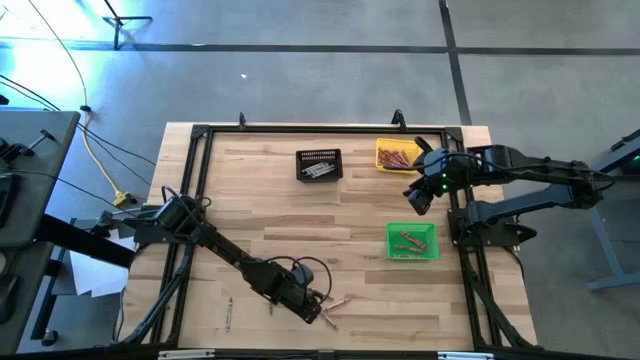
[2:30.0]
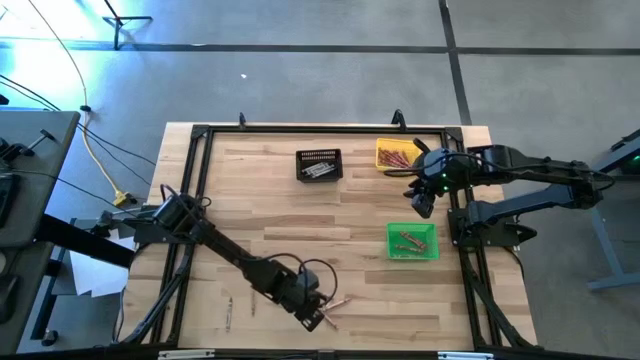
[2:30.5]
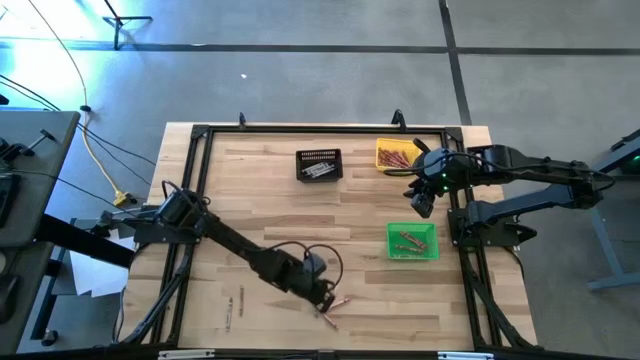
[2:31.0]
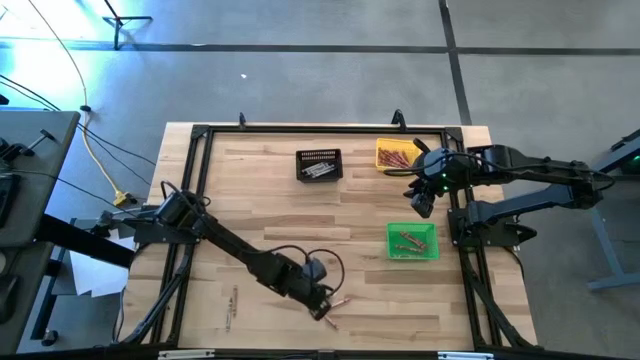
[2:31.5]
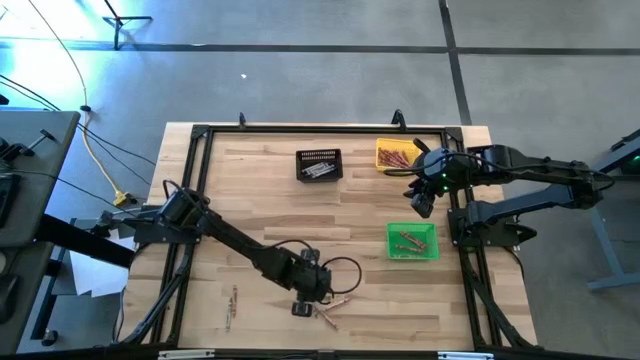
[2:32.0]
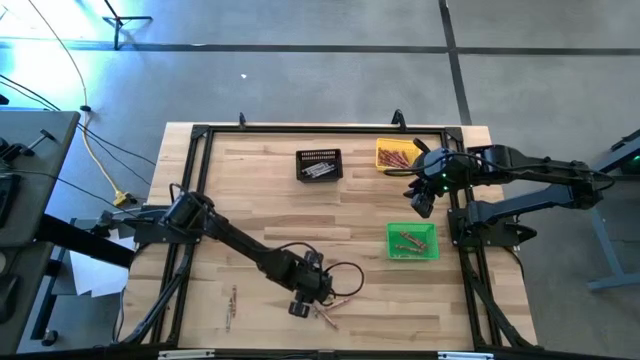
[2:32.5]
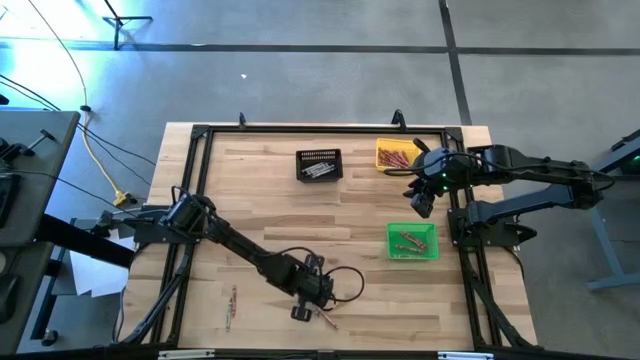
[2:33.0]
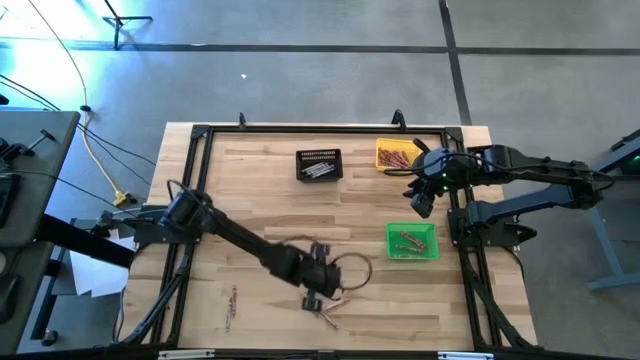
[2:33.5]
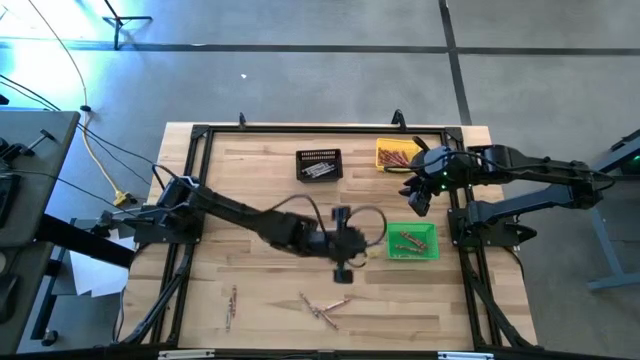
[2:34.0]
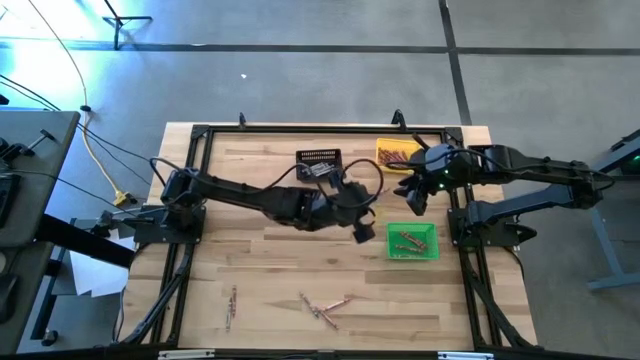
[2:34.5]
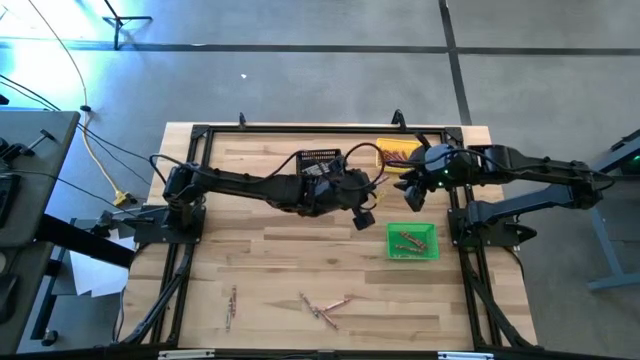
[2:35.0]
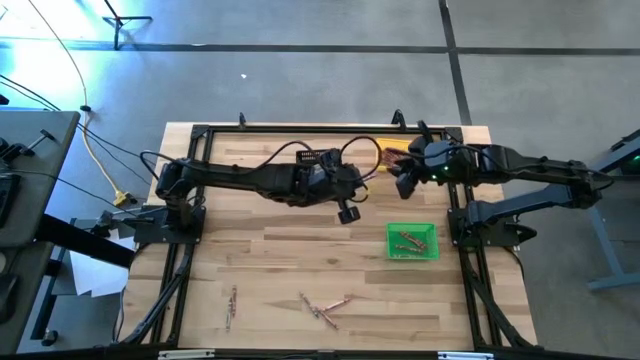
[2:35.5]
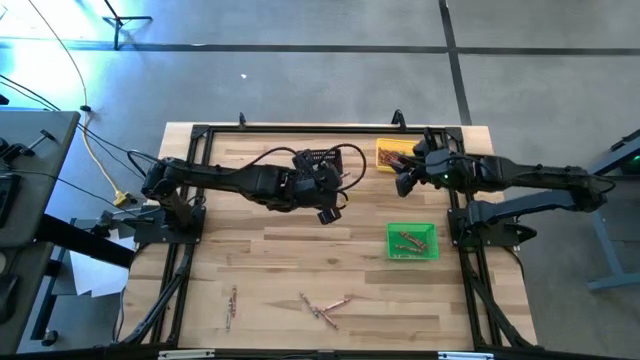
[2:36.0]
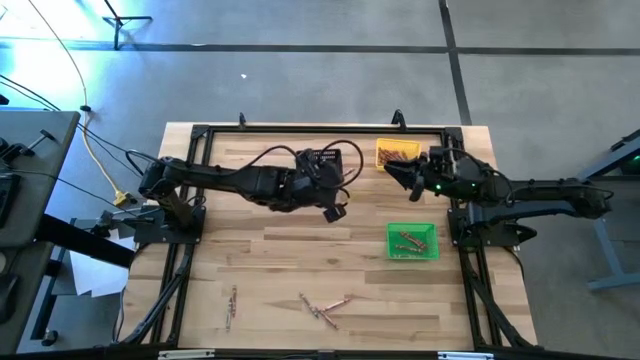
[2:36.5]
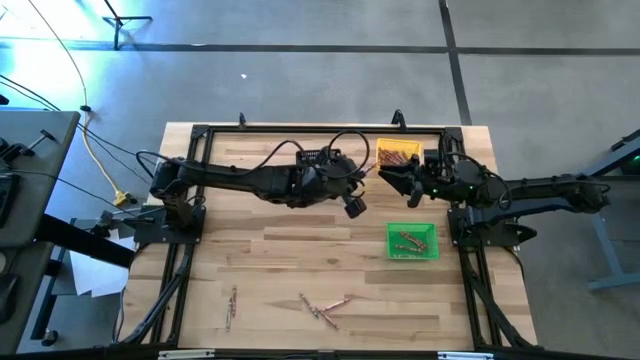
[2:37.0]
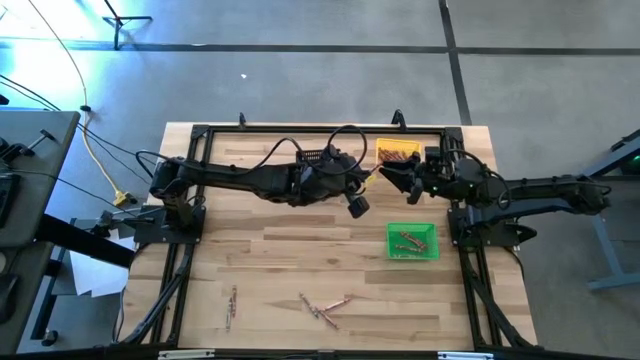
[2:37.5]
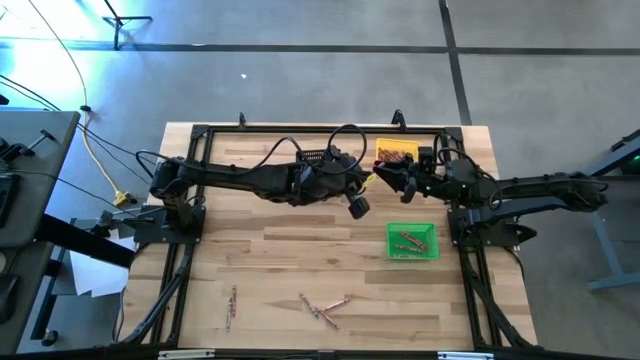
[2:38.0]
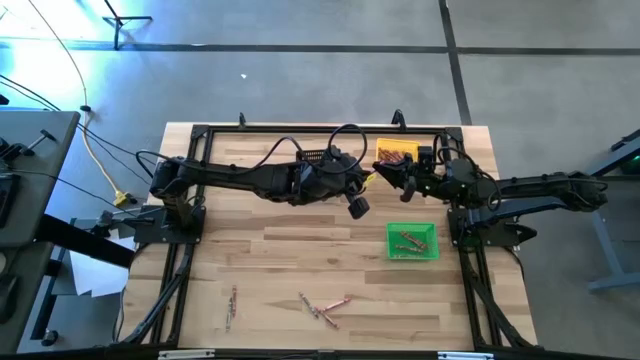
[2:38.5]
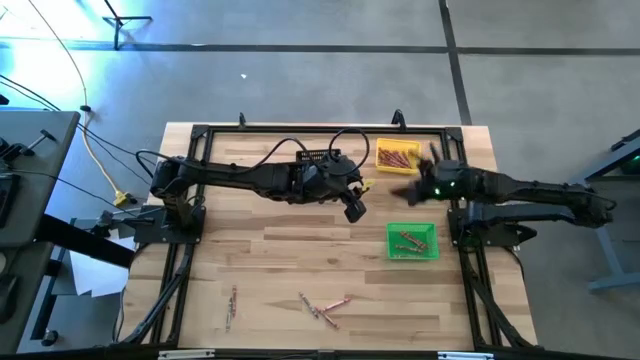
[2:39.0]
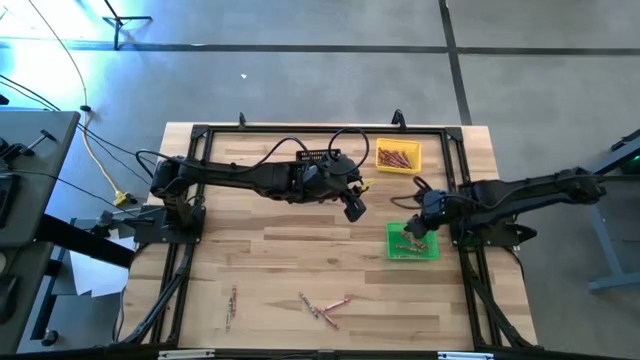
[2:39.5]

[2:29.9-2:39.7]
Task: Sort crayons
Put the pink crayon into the green basket

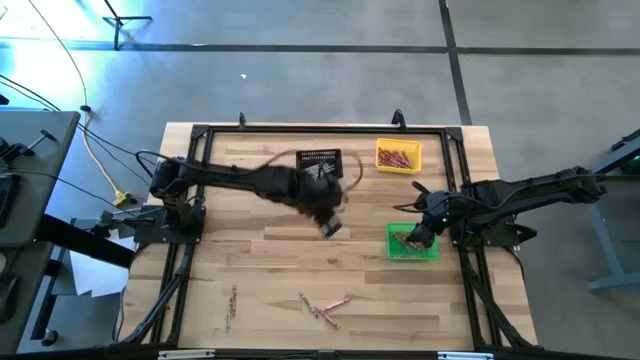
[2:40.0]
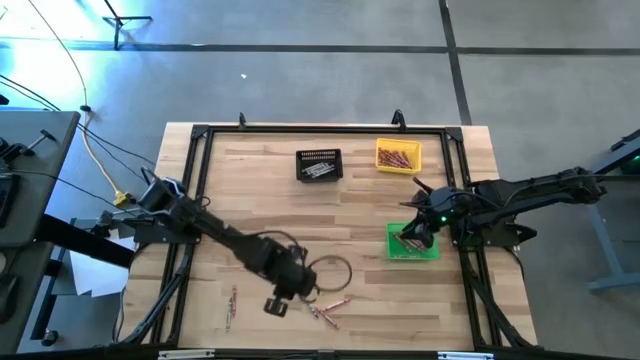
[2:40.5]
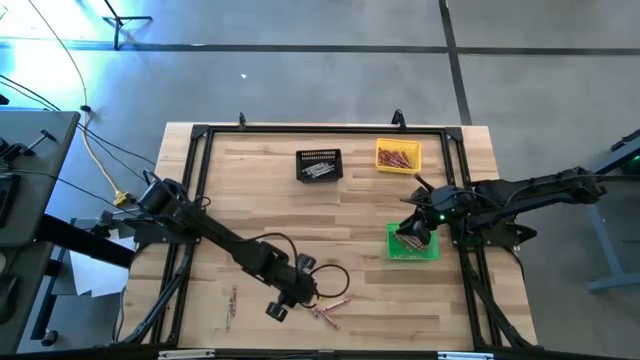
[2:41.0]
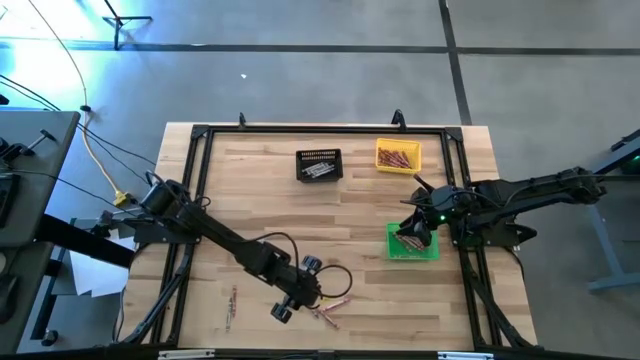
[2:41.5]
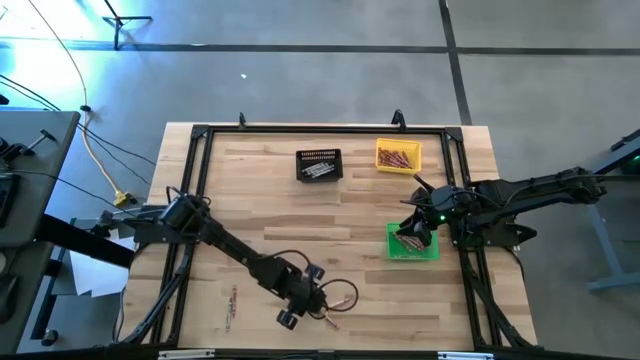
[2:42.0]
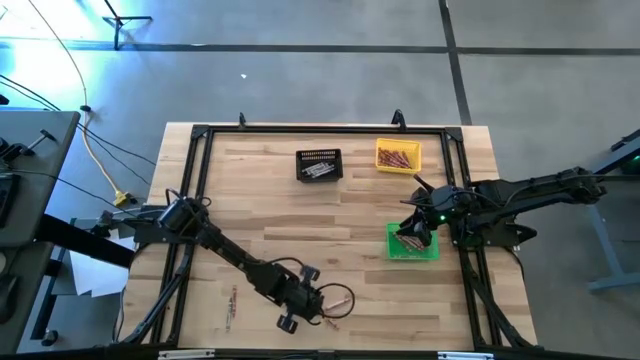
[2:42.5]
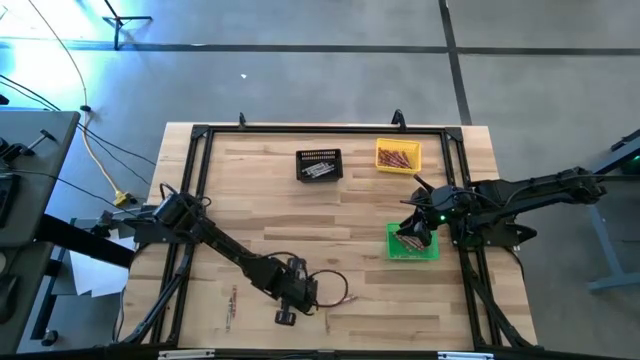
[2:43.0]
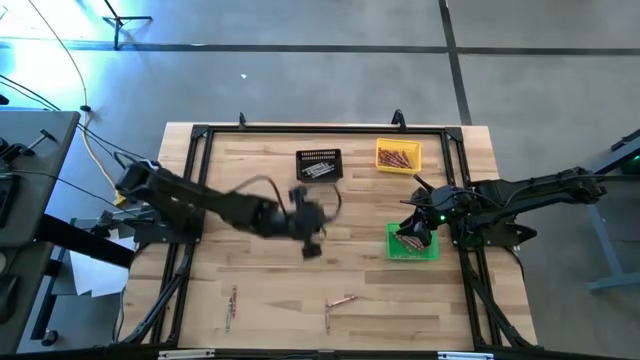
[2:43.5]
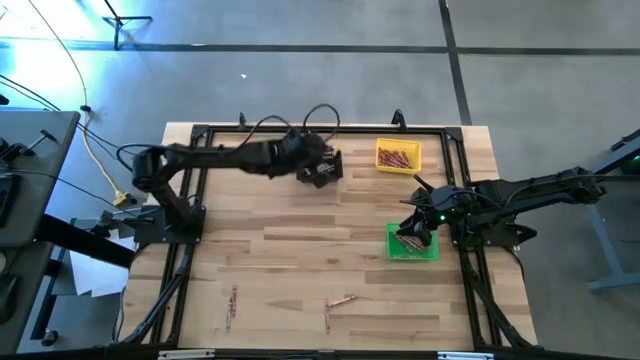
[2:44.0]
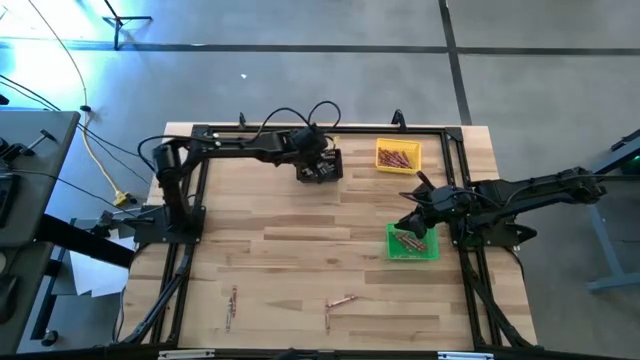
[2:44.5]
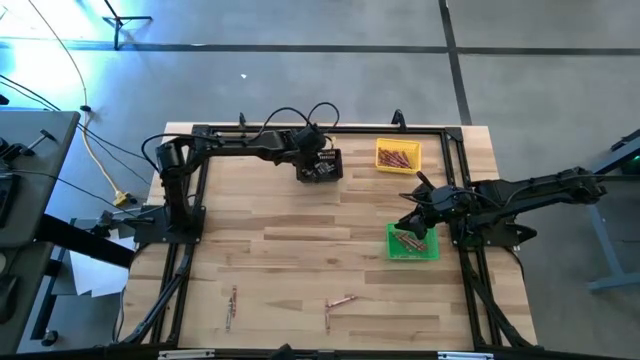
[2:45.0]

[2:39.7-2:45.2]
Put the gray crayon into the black basket

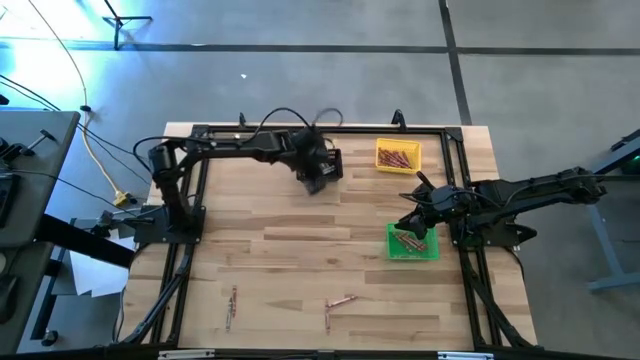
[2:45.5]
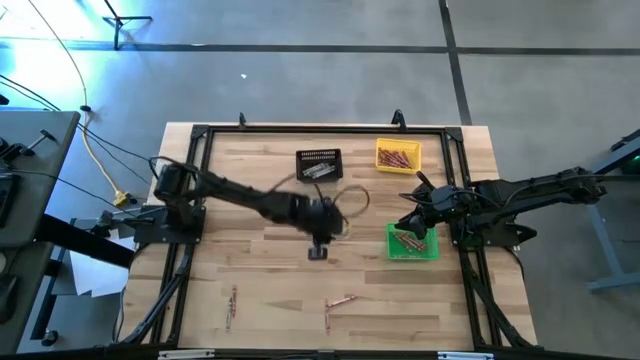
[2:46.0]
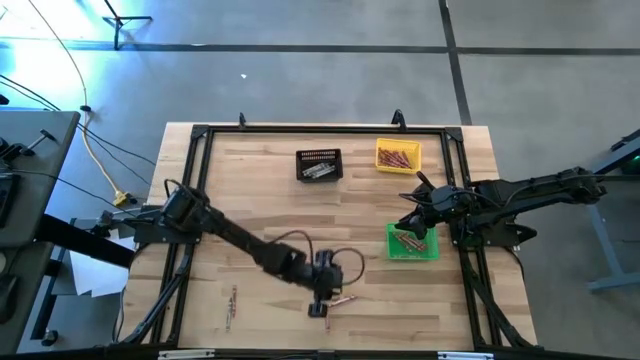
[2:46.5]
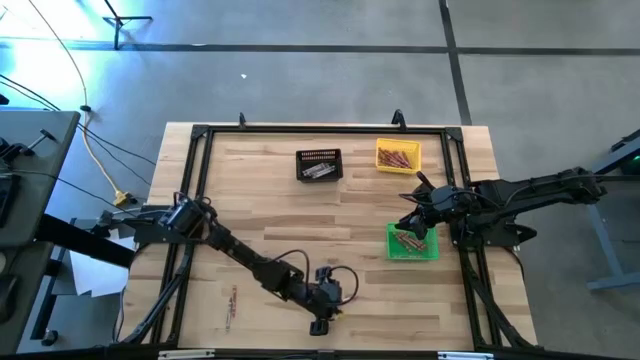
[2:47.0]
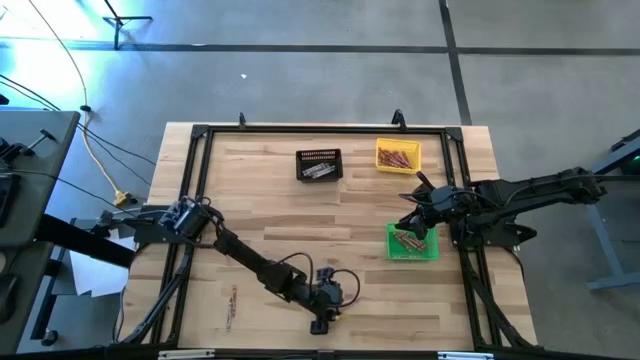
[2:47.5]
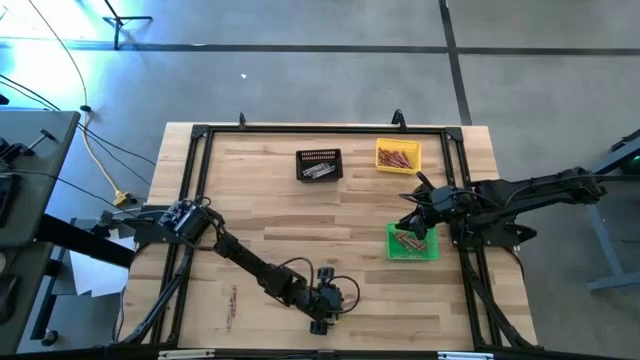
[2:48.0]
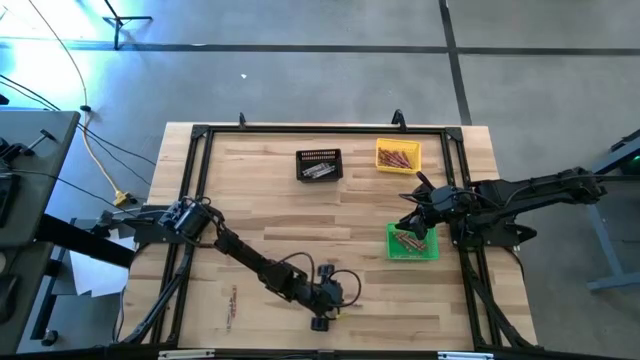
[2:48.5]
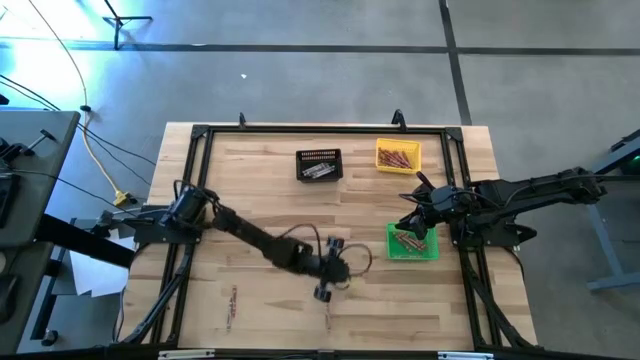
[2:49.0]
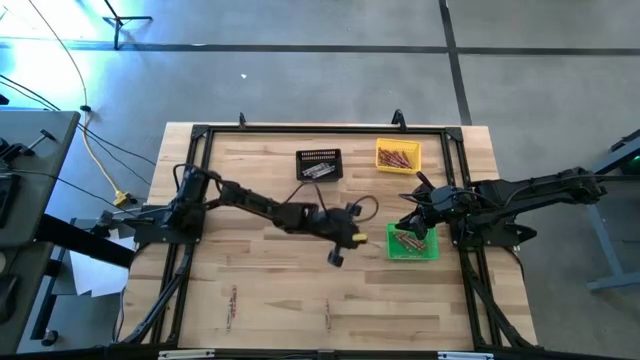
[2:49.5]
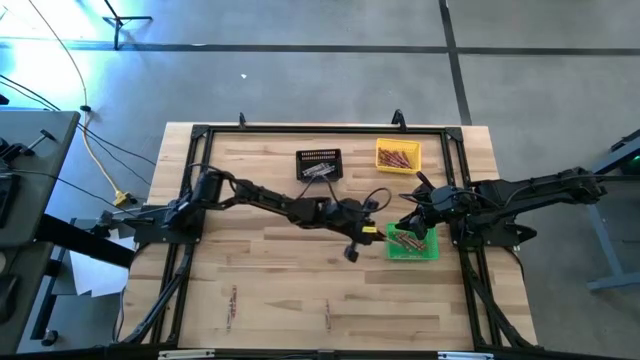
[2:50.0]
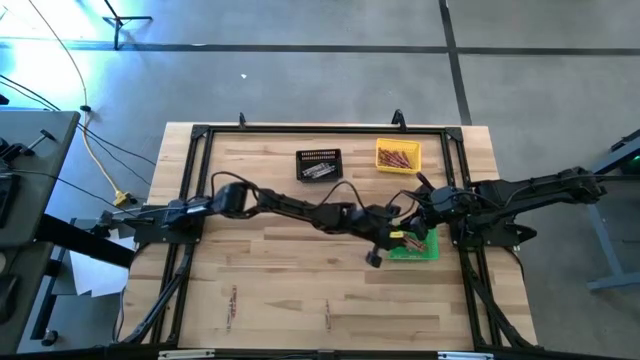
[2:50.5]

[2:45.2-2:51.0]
Put the pink crayon into the green basket
